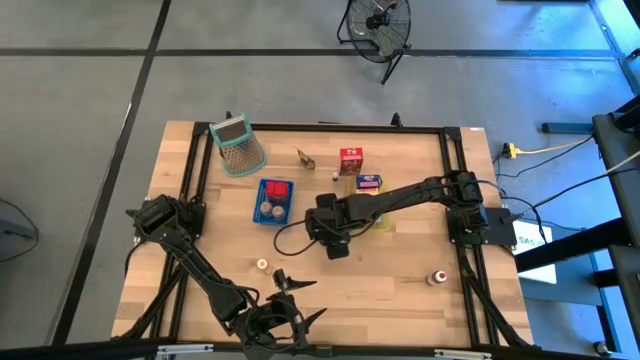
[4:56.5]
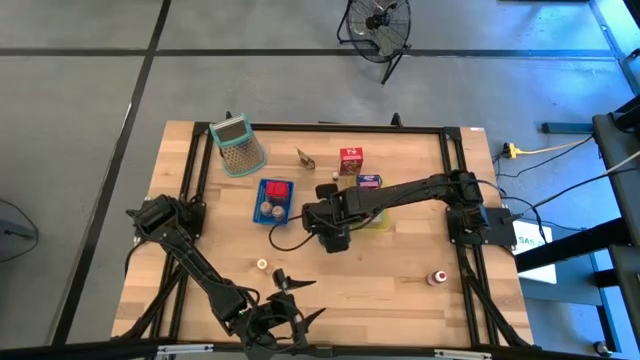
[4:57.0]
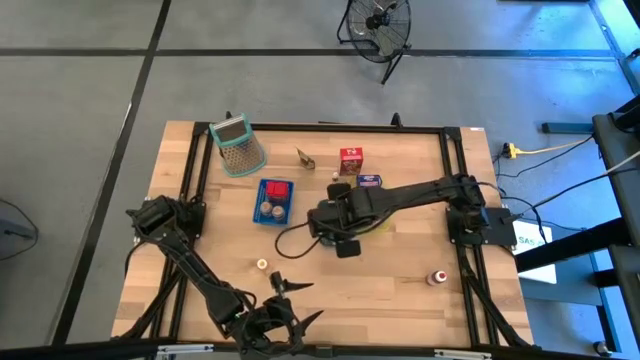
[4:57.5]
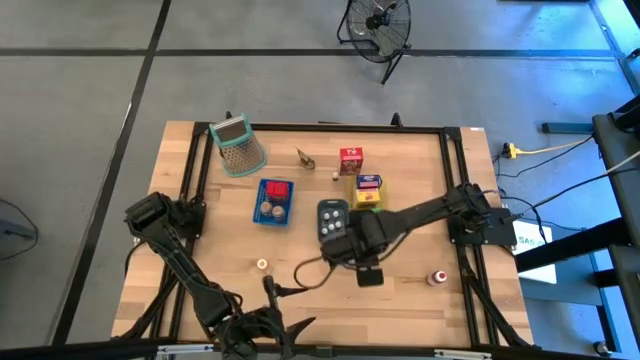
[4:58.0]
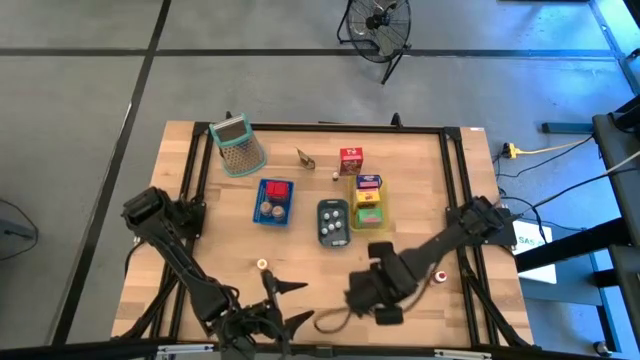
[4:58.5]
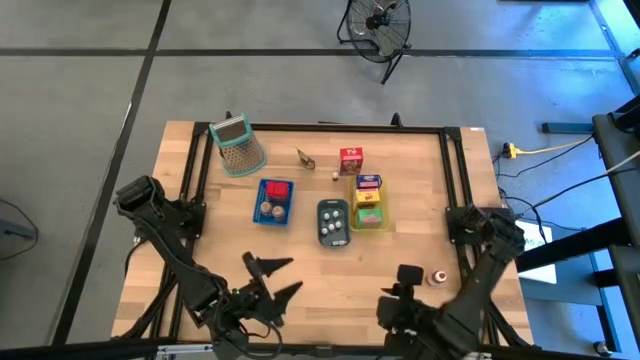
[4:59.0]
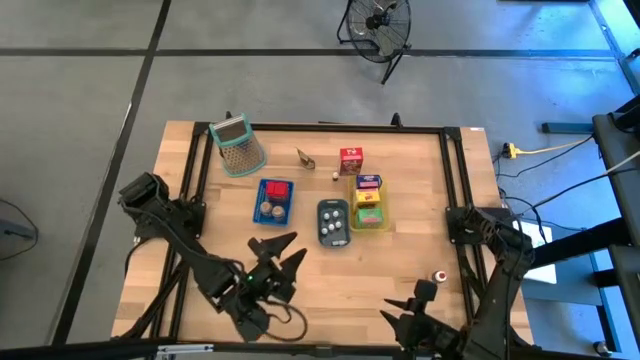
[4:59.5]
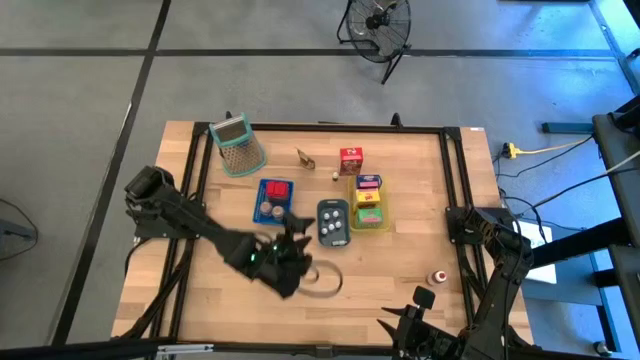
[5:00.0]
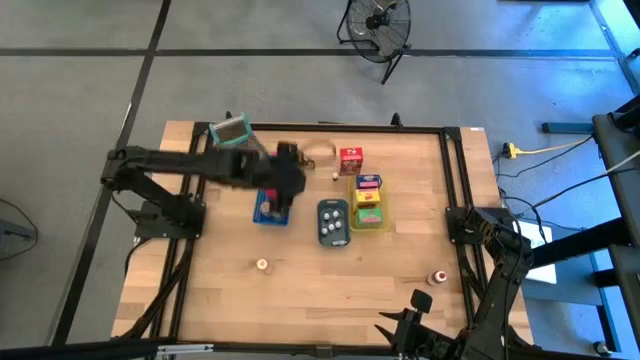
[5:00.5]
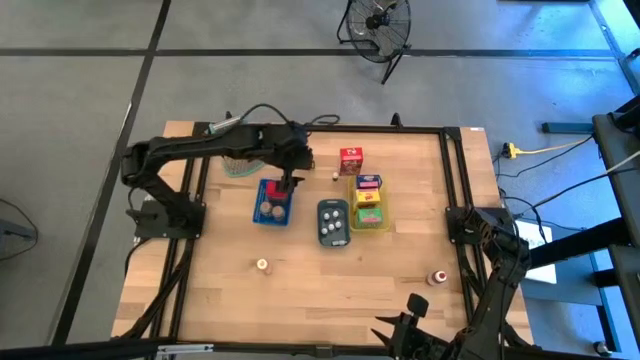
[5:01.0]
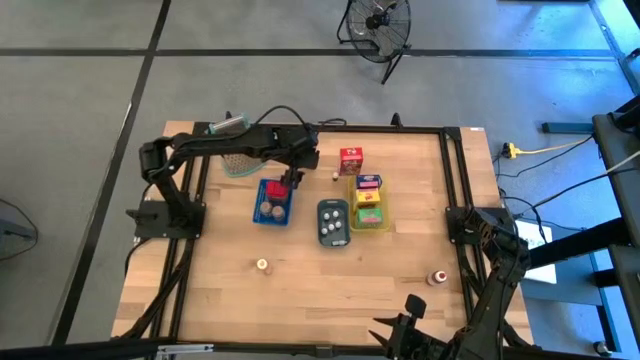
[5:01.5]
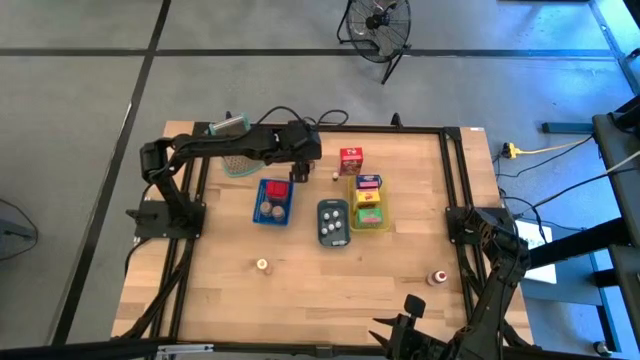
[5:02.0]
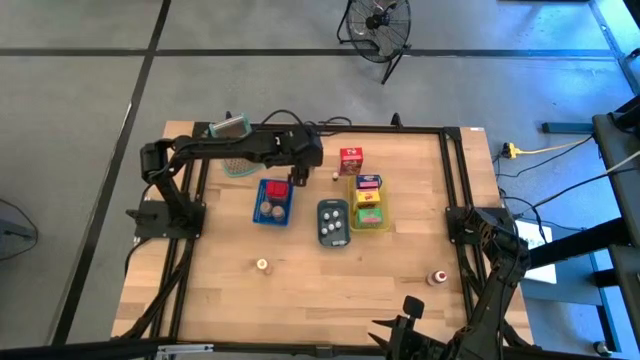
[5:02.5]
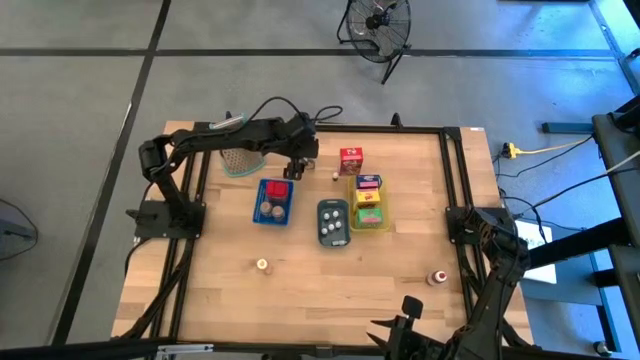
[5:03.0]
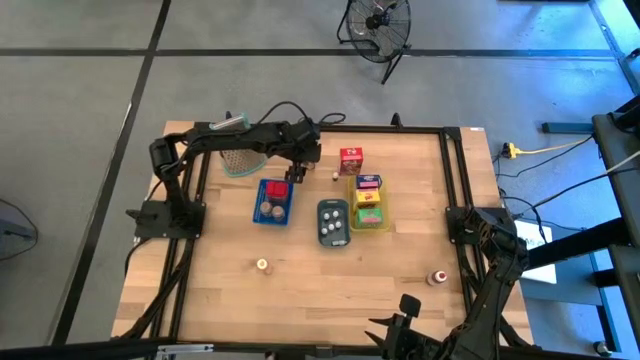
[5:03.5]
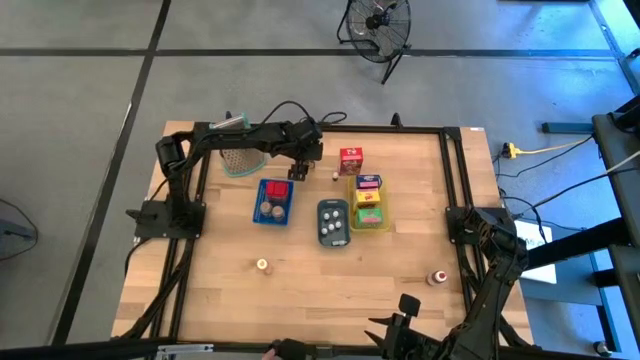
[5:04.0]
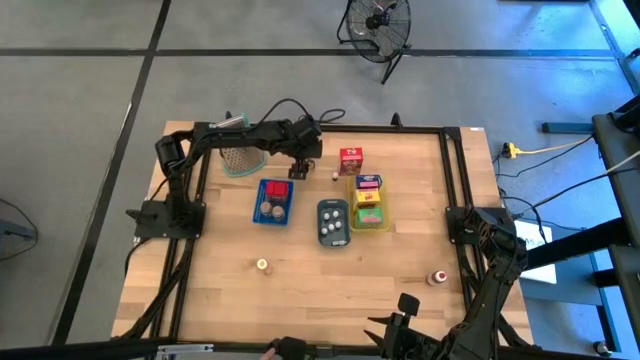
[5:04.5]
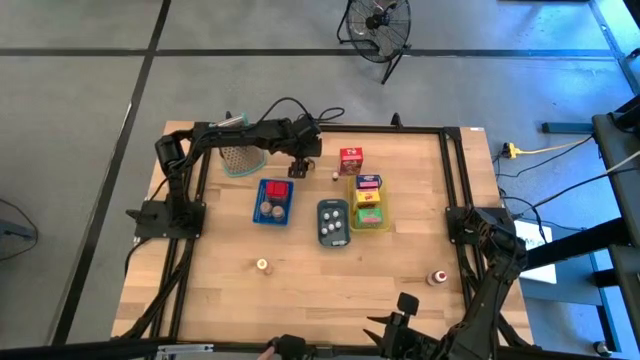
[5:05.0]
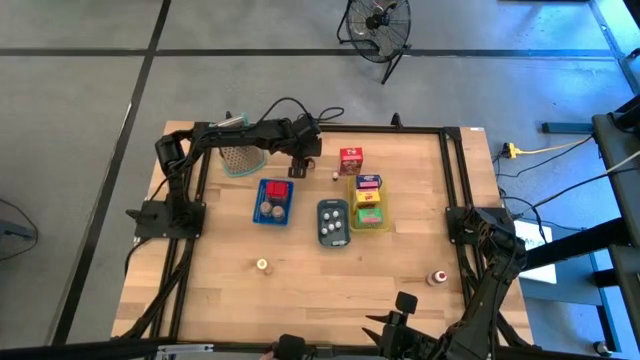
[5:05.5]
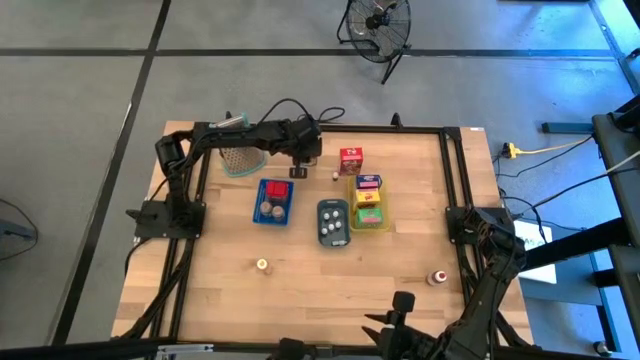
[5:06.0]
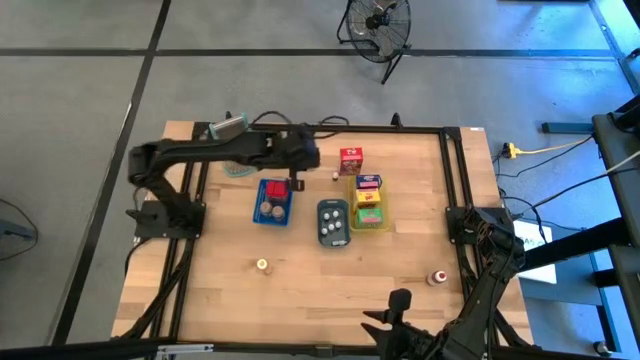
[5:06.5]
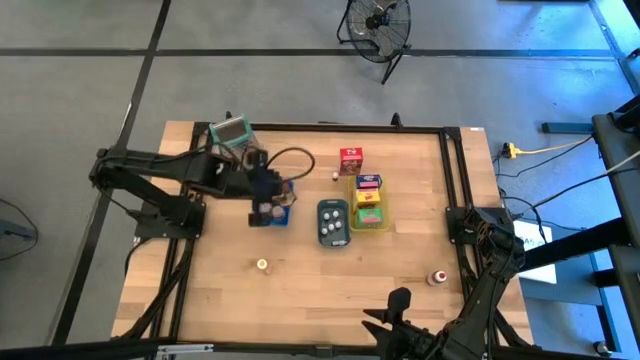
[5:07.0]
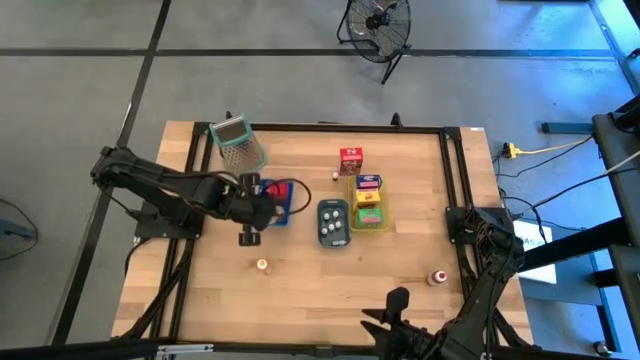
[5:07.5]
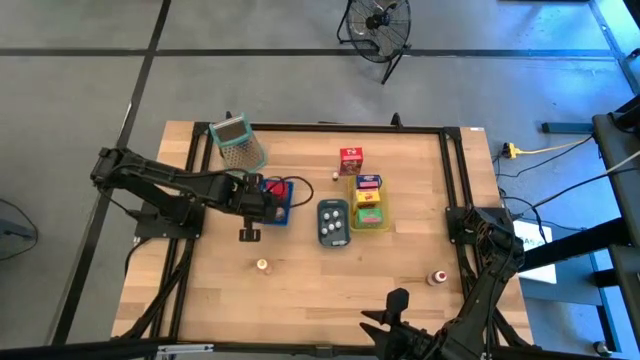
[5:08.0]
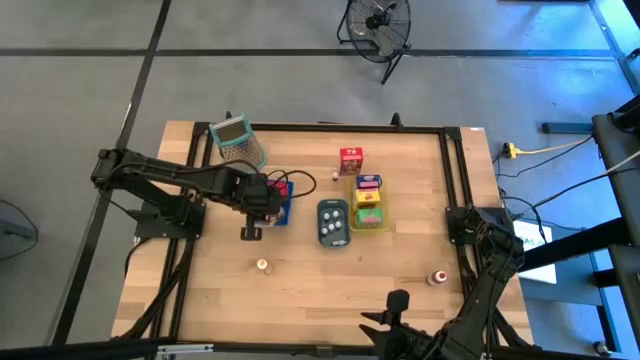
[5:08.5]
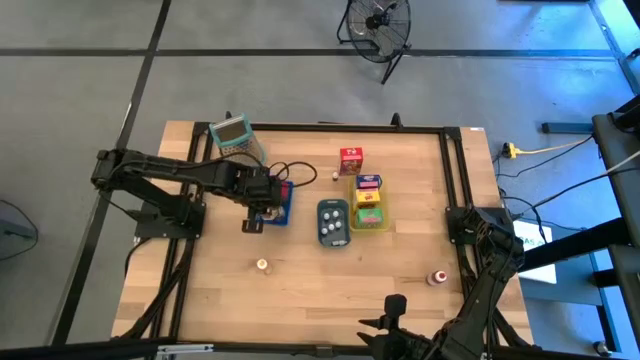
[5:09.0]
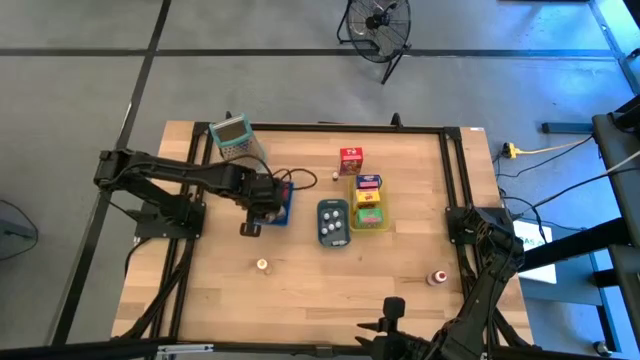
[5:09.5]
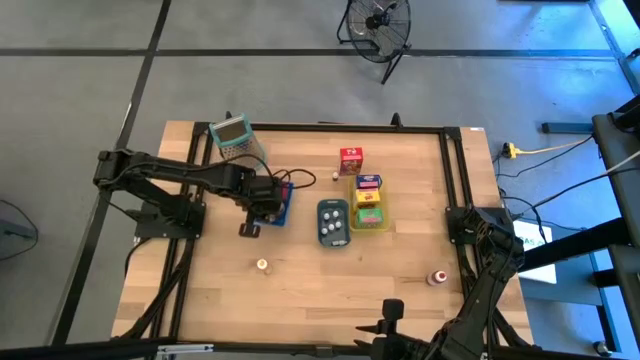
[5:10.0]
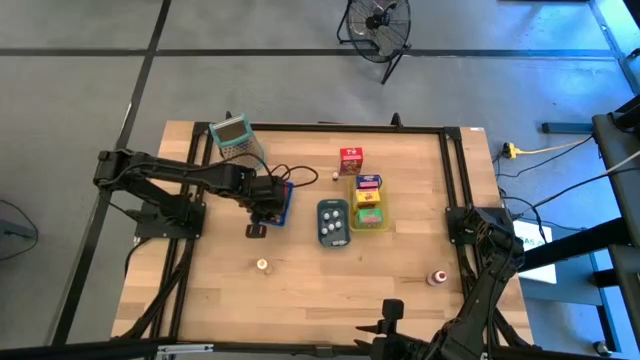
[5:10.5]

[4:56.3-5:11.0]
Task: Pick & Place Kitchen Items
Put the orange seasoning pack into the blue bin

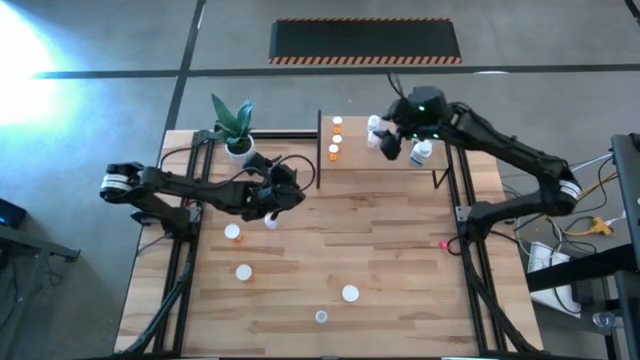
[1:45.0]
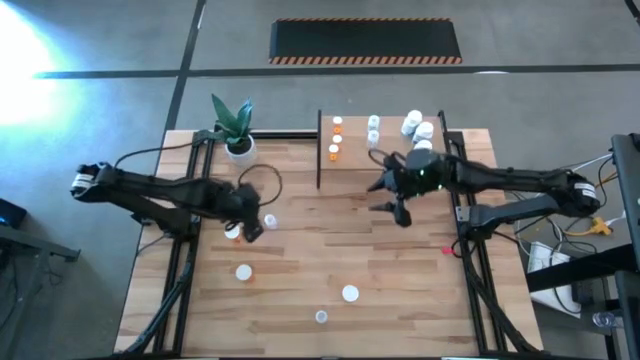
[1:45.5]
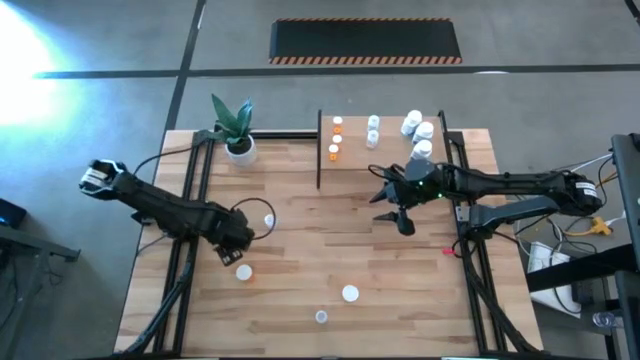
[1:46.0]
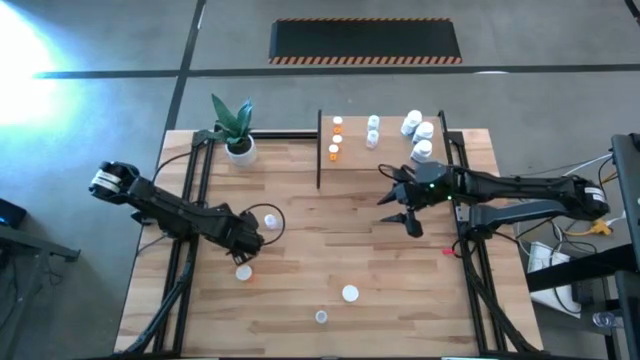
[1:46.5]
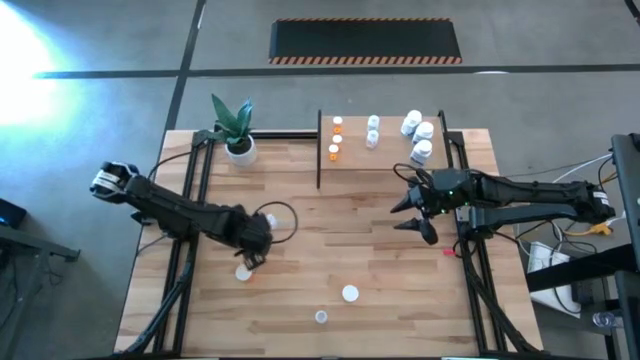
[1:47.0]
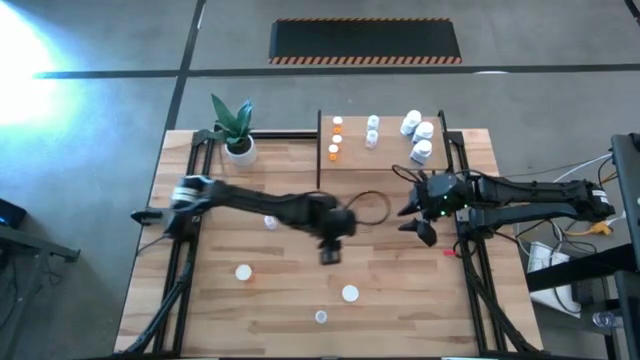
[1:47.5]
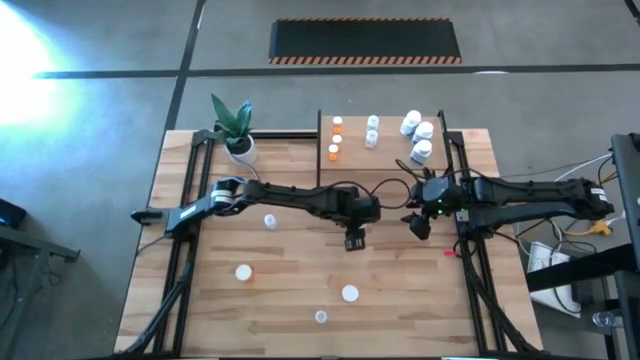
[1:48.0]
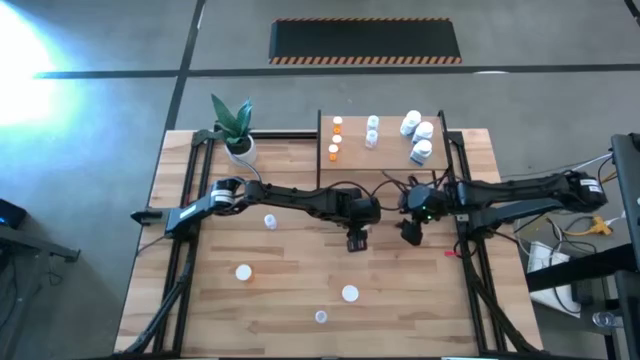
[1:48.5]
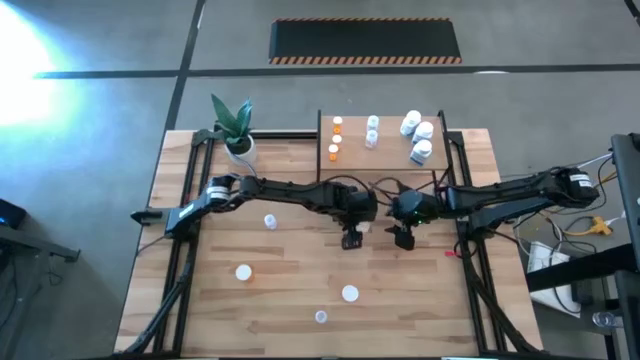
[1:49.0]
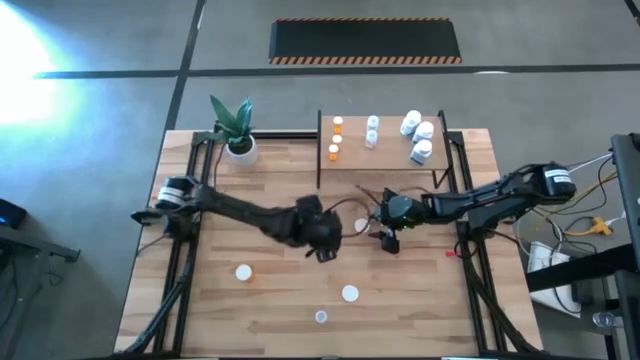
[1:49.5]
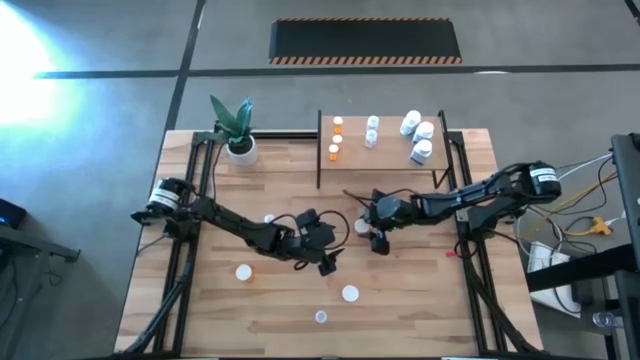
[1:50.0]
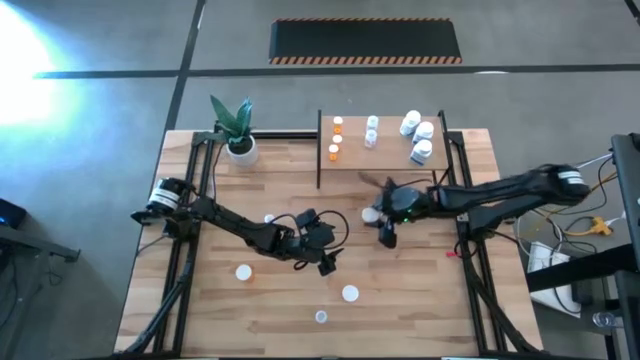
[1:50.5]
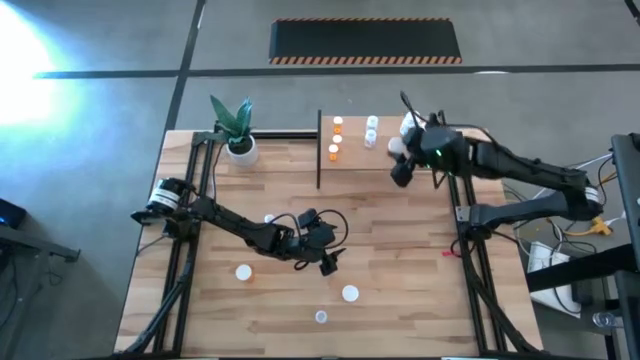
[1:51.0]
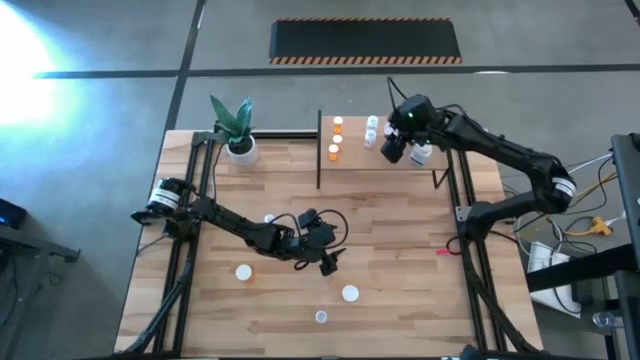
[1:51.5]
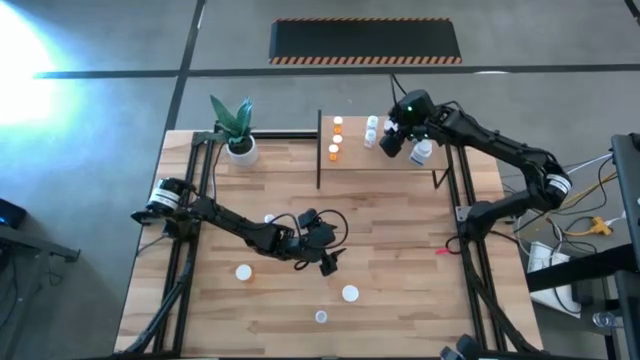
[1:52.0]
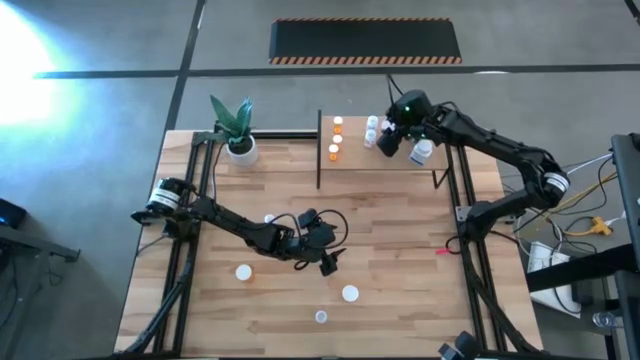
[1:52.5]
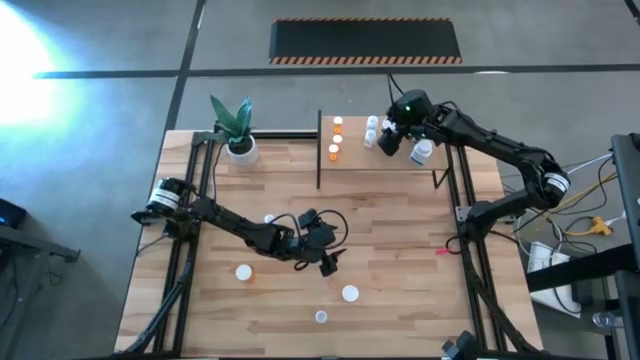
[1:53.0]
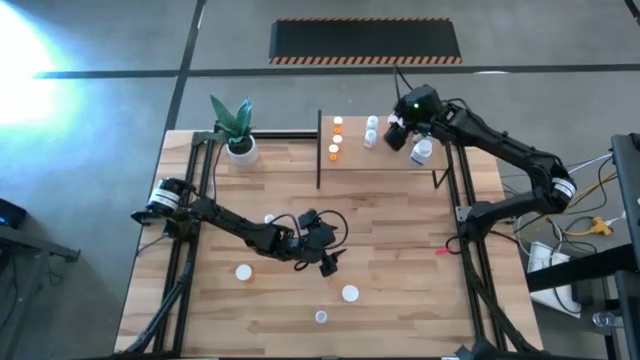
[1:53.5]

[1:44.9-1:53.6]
Task: Pick and place medicine bottles onto shelf by color
Put the big orange pill bottle on the shelf
